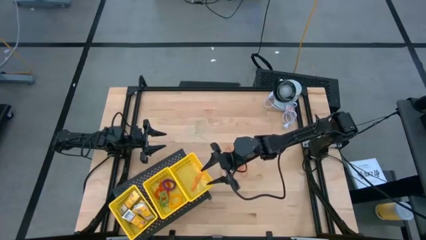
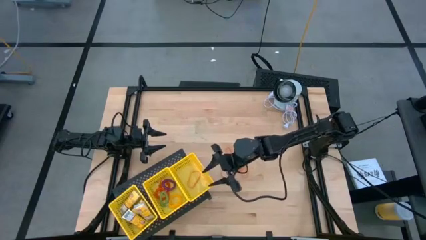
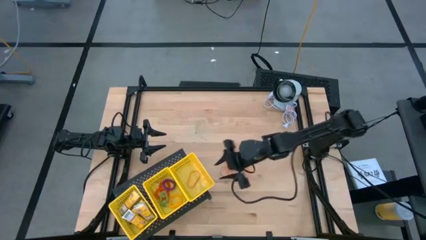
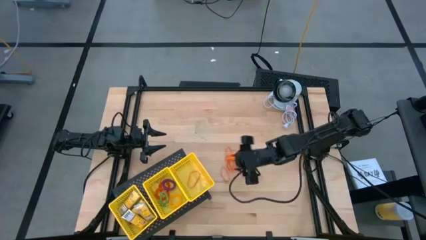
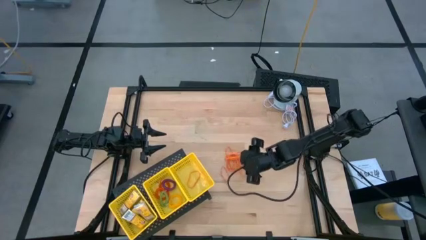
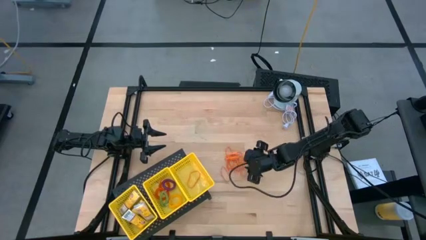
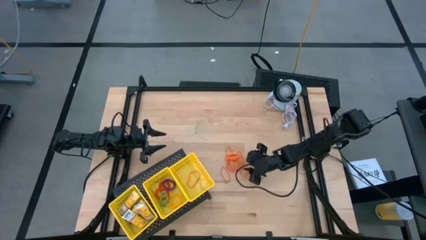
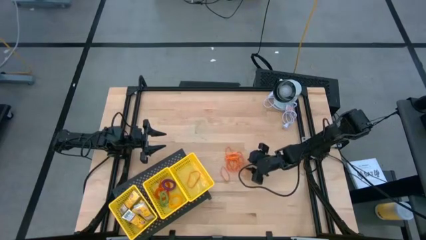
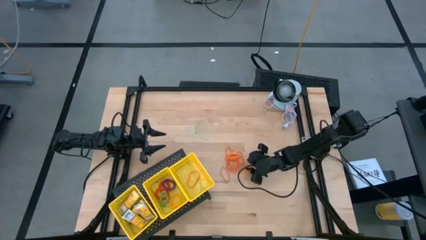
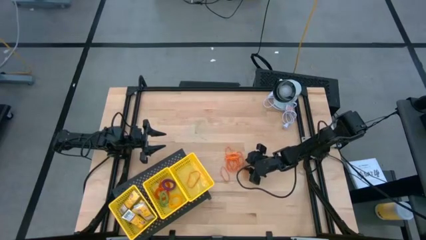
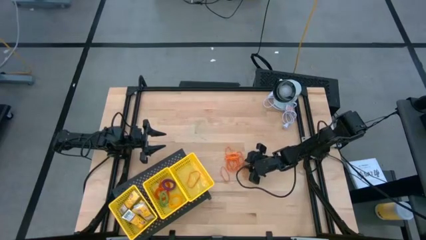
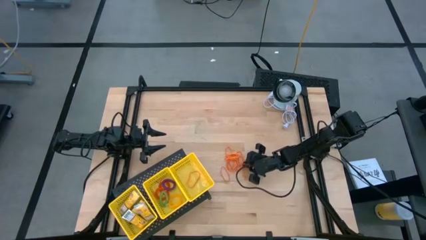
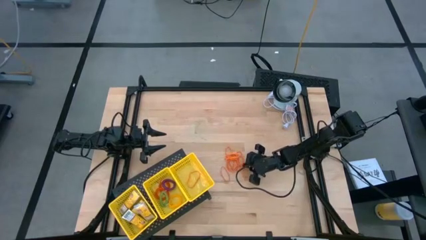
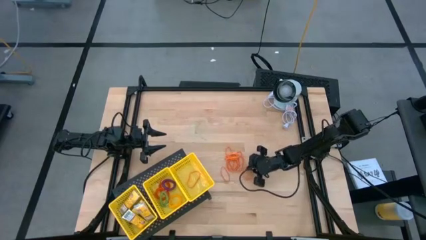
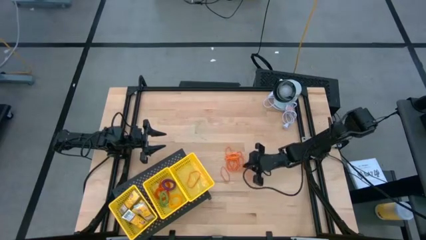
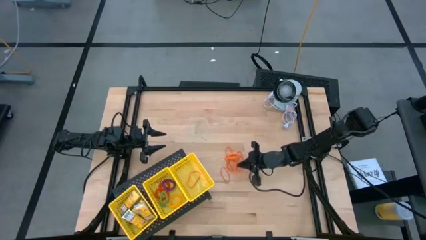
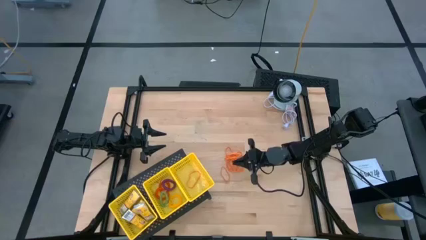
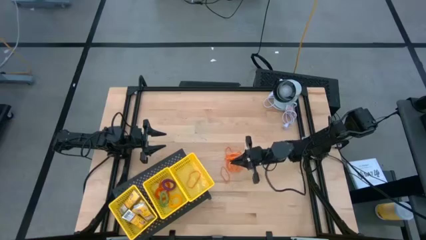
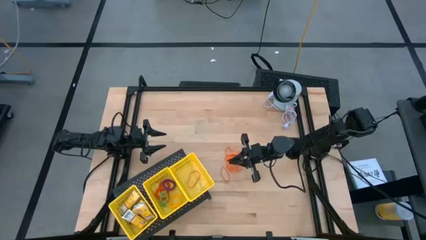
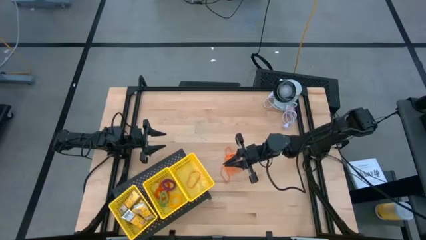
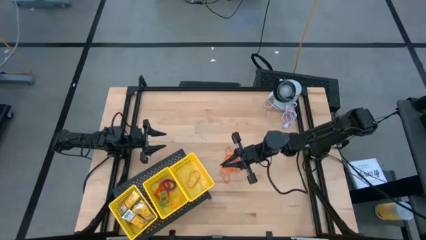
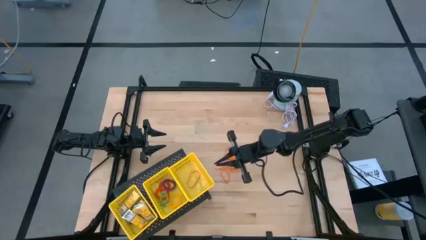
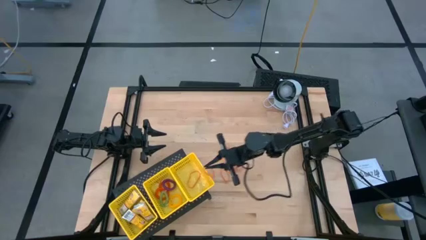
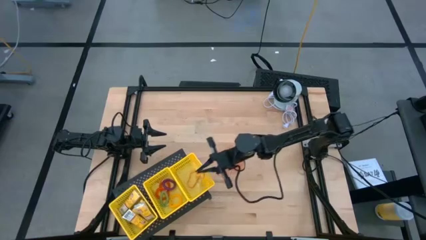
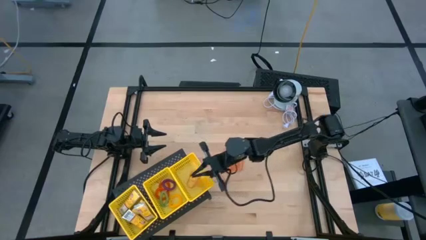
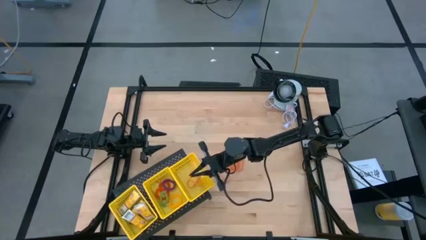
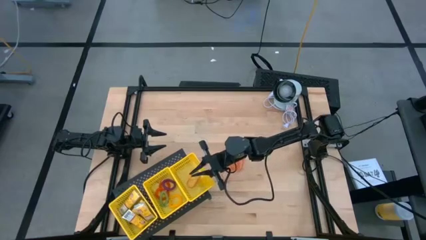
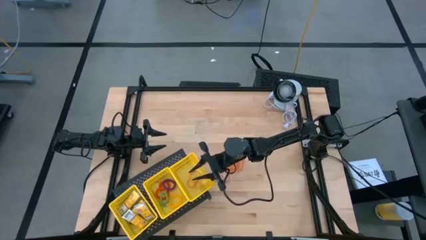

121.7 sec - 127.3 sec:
Task: Pick & Place Office Desk Supplies
Put the orange rubber band into the right yellow bin on the shelf

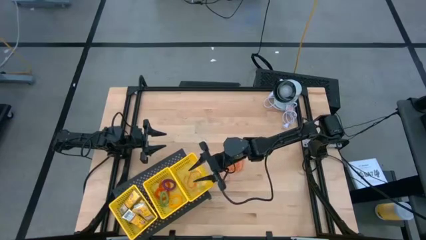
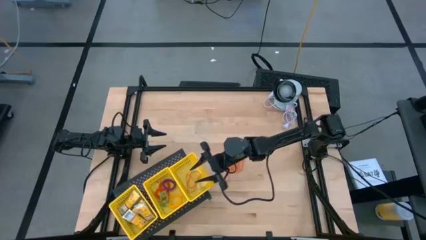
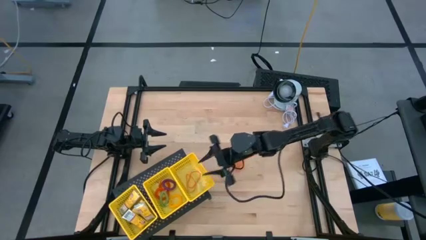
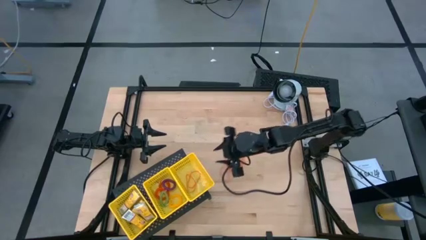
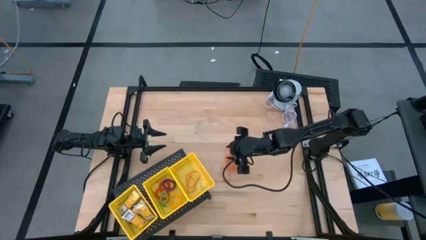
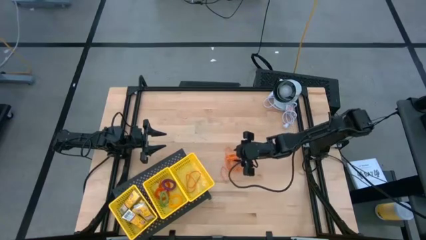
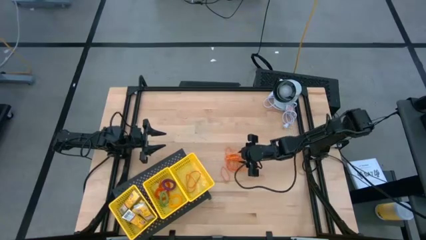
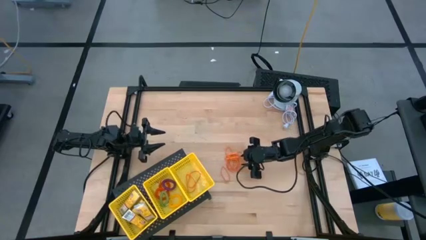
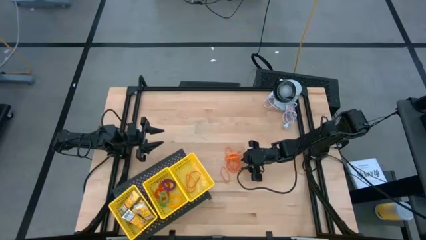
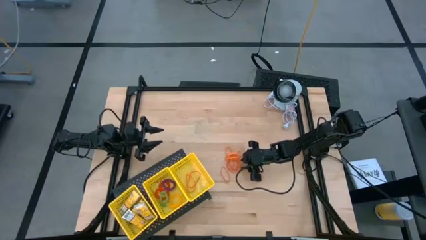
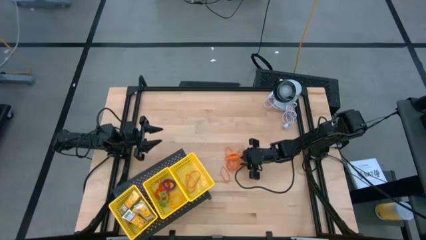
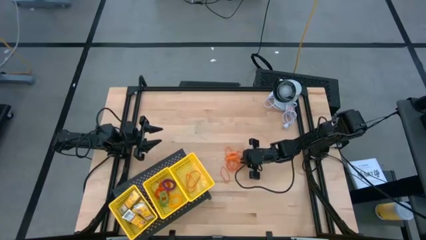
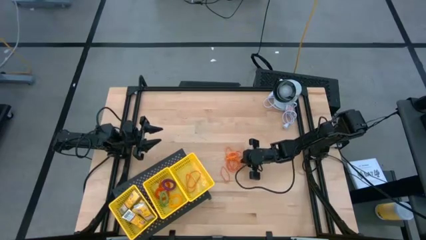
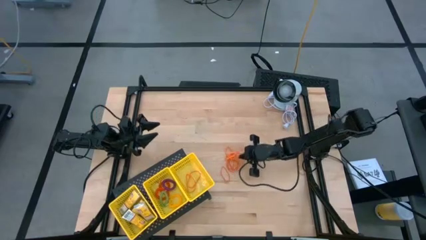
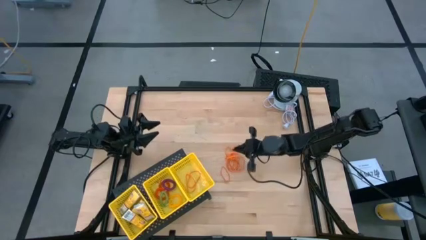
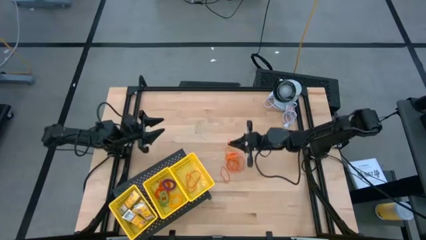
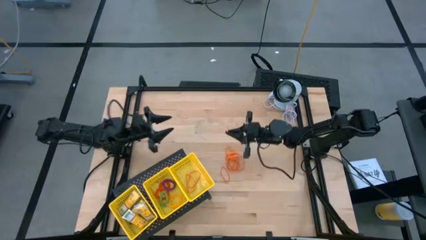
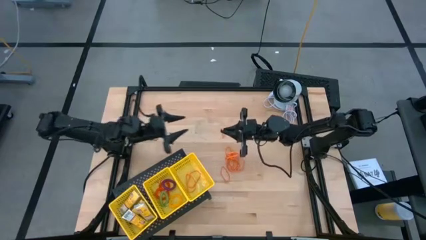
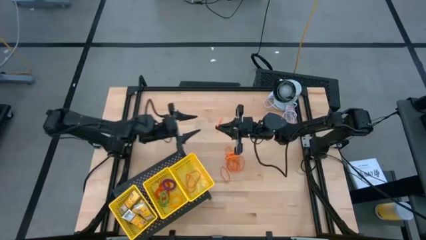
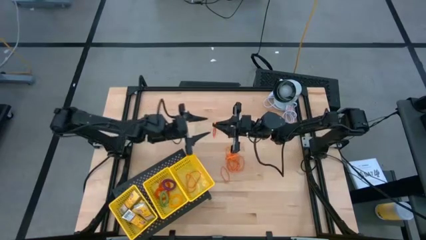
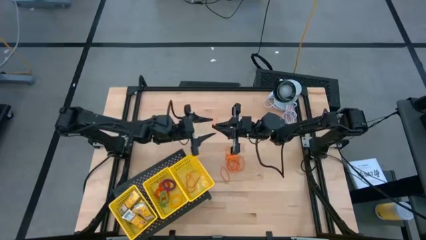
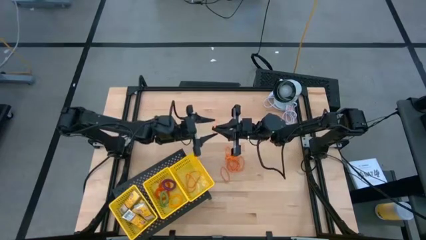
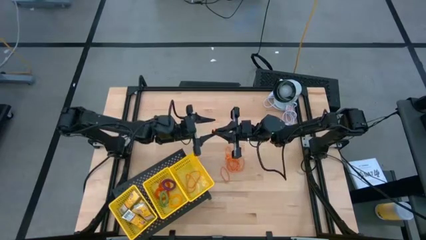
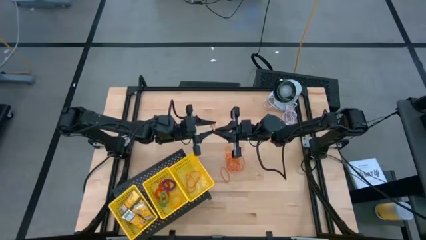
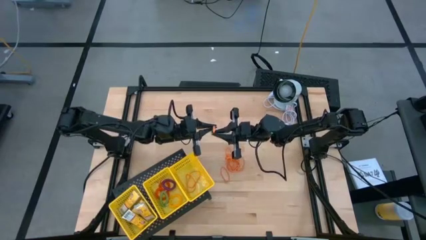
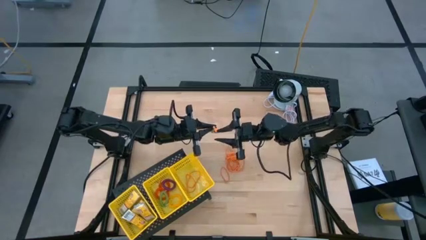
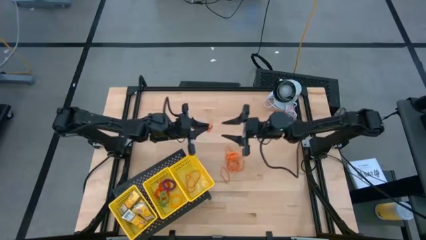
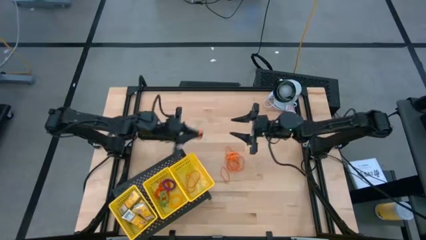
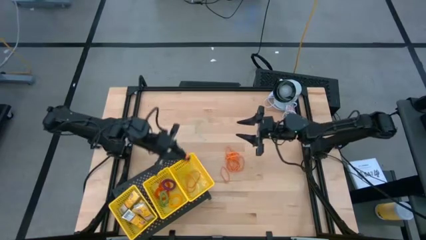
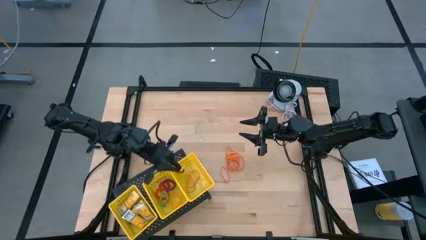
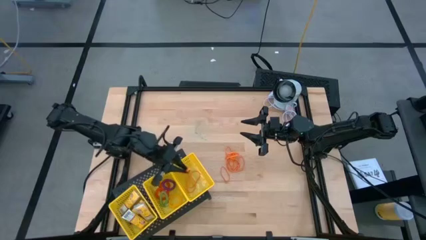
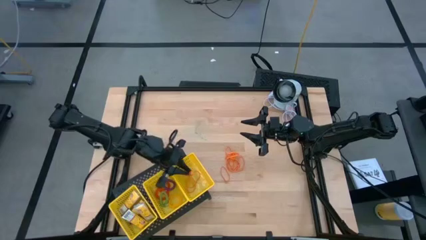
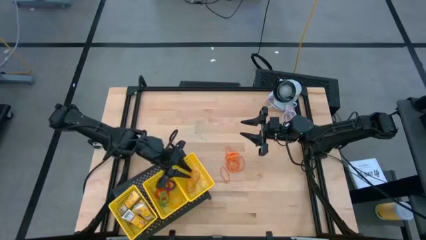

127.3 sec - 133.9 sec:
Put the orange rubber band into the right yellow bin on the shelf

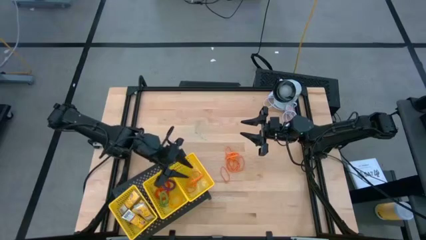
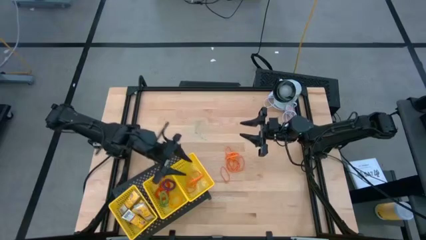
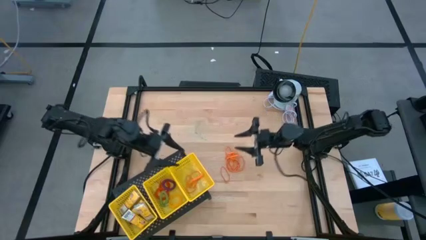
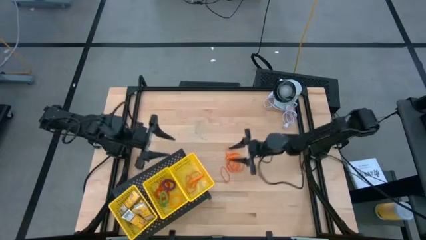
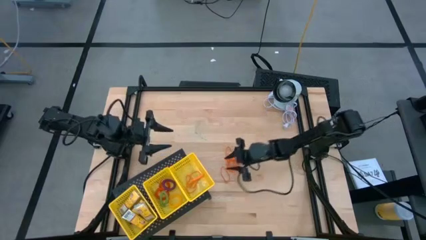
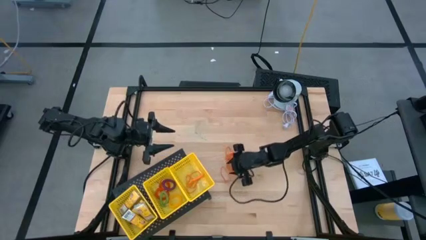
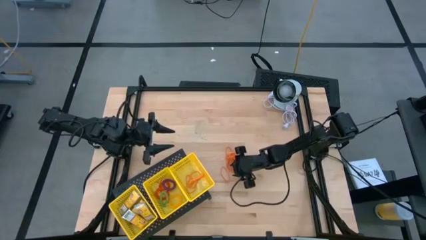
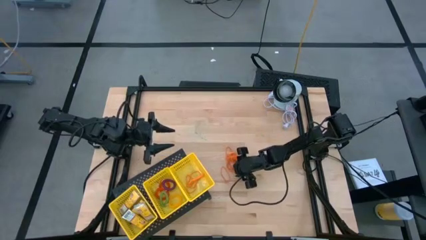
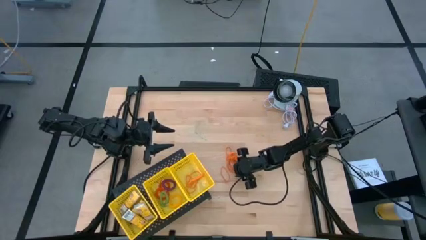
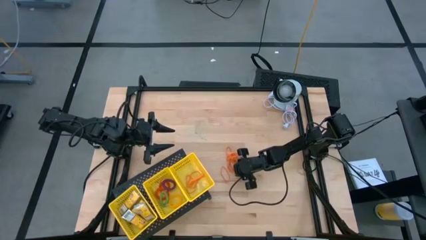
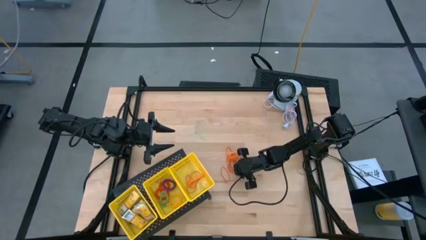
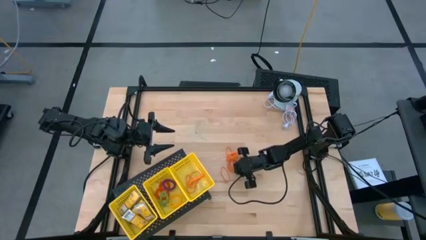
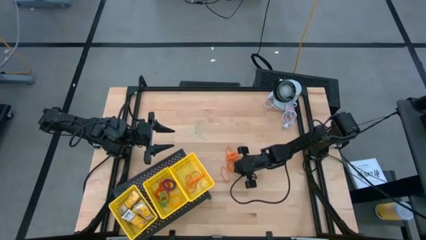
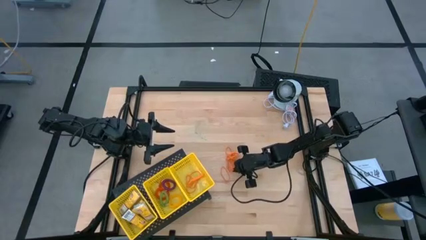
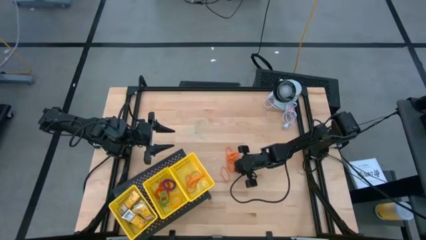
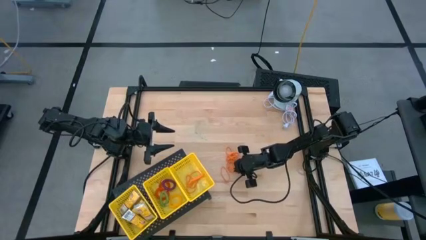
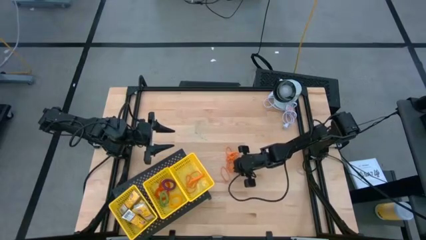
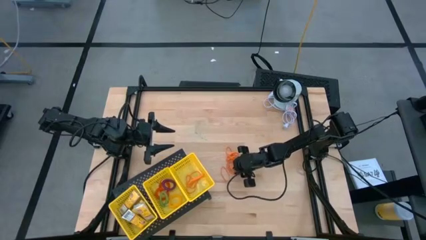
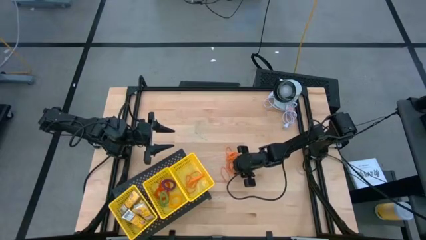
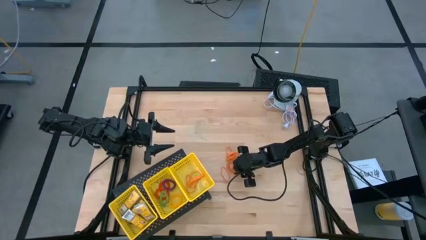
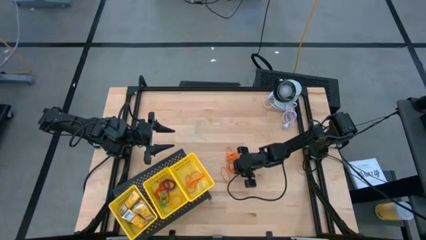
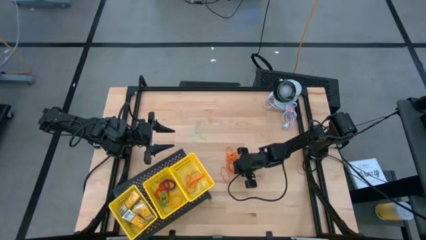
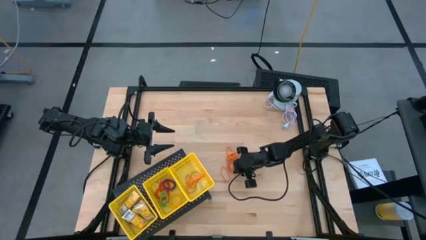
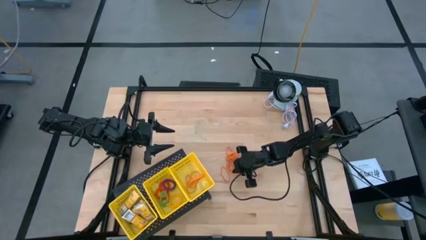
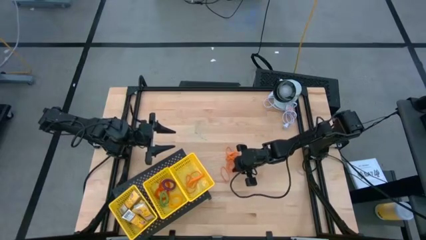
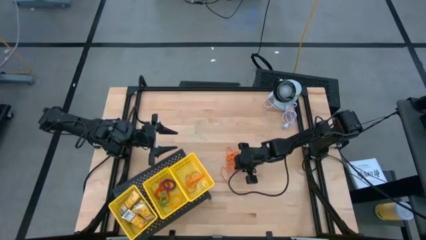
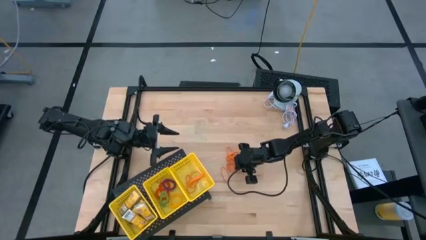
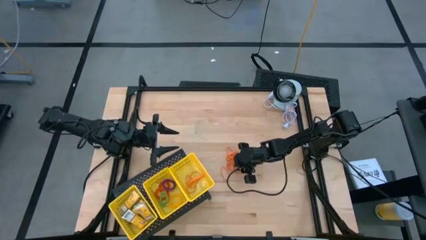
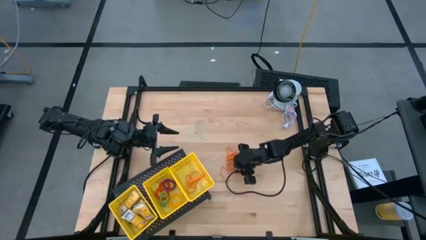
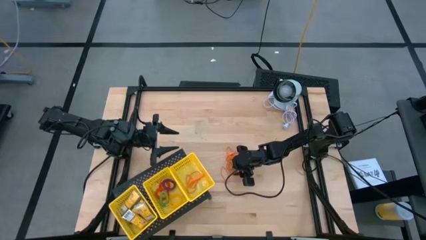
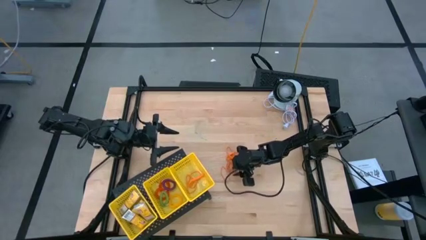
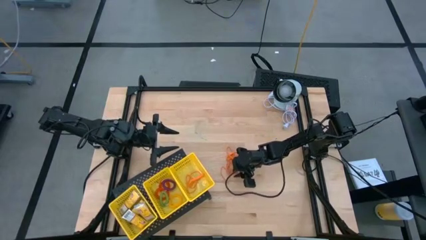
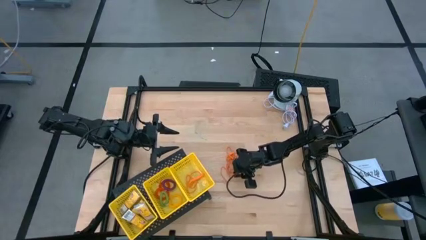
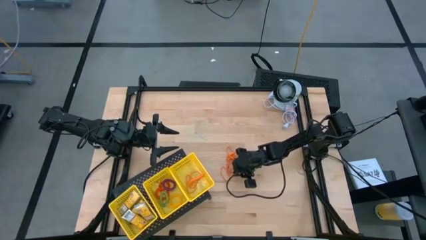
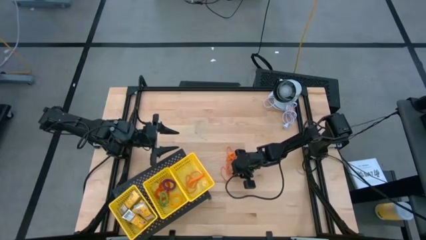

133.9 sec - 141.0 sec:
Put the orange rubber band into the right yellow bin on the shelf
